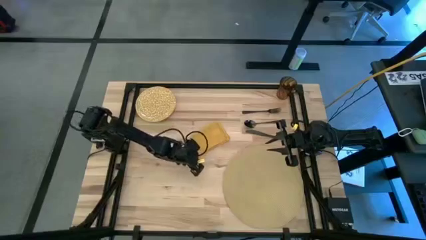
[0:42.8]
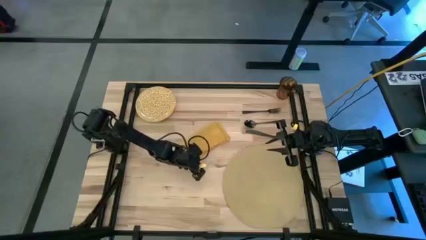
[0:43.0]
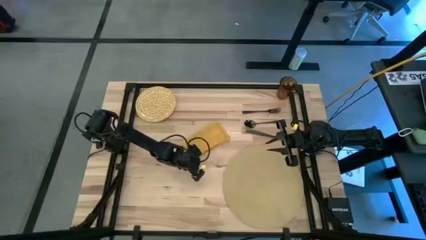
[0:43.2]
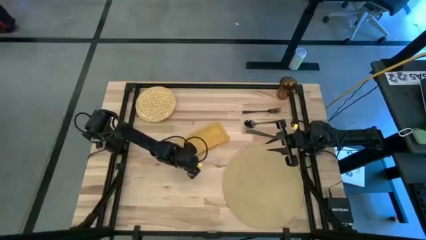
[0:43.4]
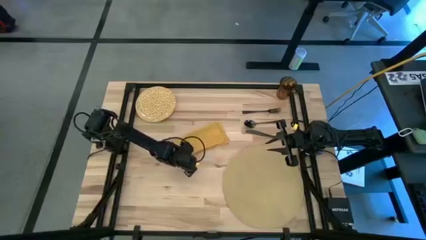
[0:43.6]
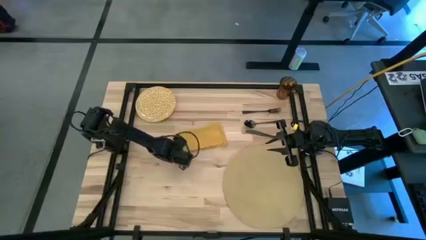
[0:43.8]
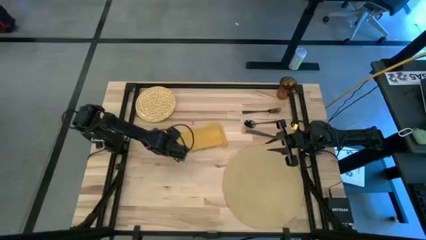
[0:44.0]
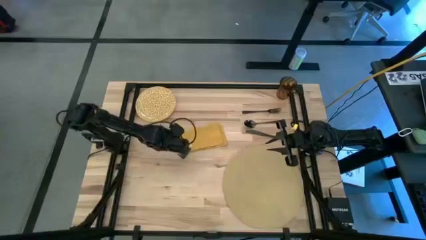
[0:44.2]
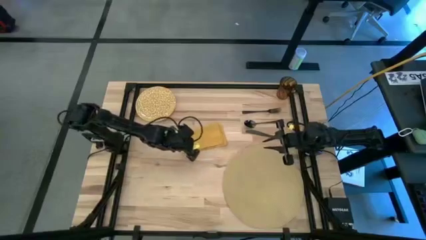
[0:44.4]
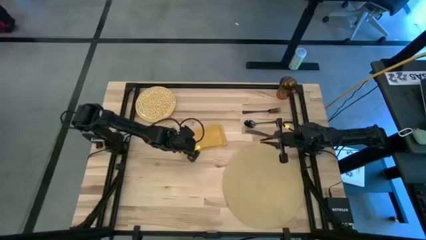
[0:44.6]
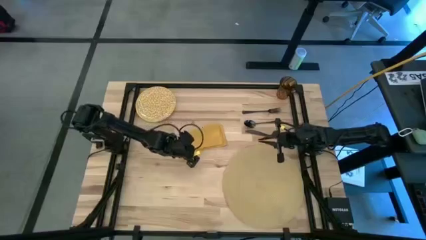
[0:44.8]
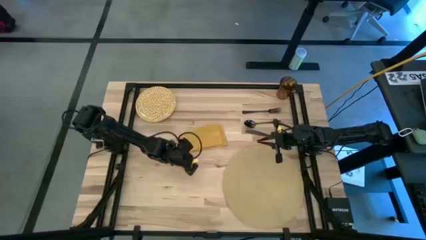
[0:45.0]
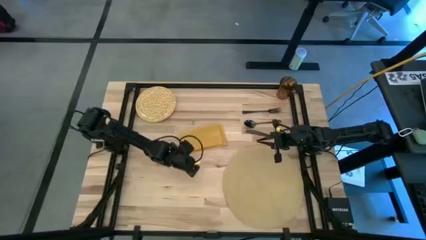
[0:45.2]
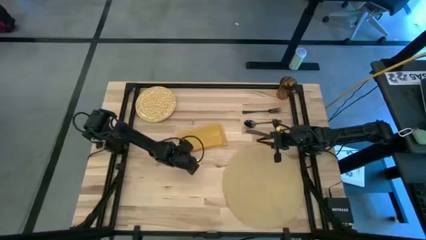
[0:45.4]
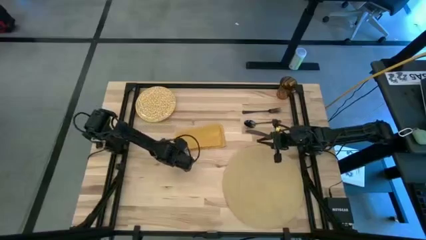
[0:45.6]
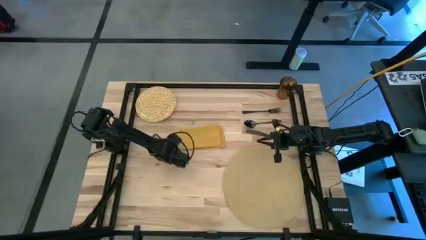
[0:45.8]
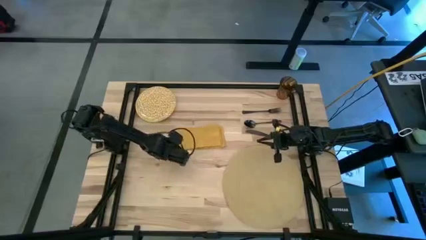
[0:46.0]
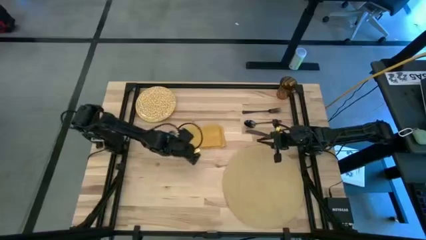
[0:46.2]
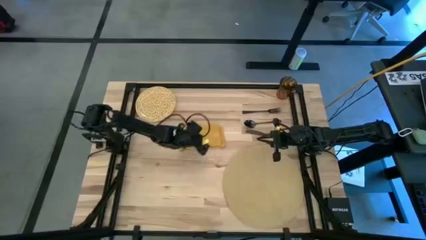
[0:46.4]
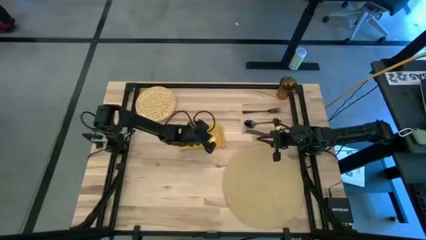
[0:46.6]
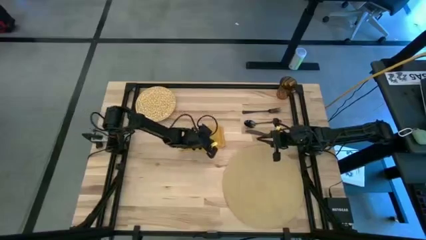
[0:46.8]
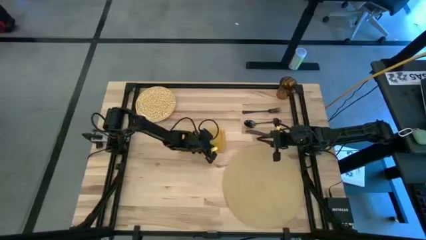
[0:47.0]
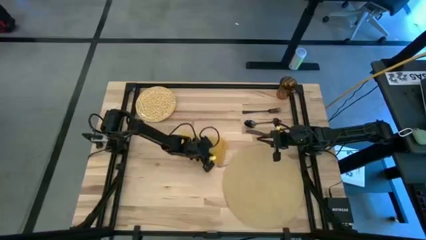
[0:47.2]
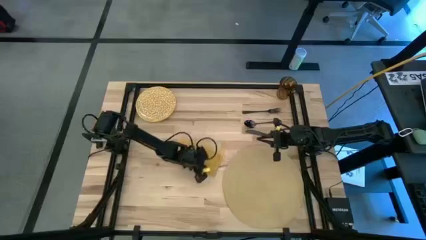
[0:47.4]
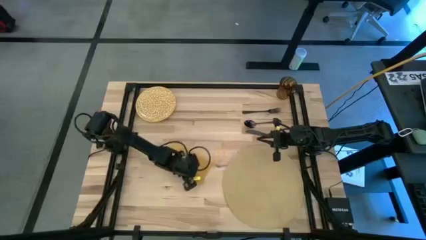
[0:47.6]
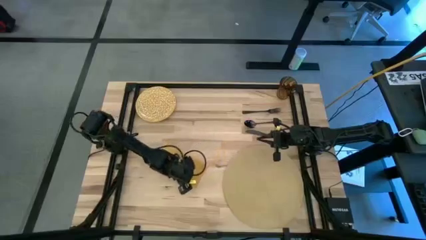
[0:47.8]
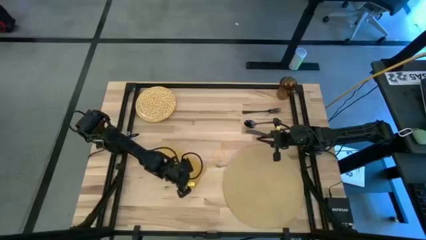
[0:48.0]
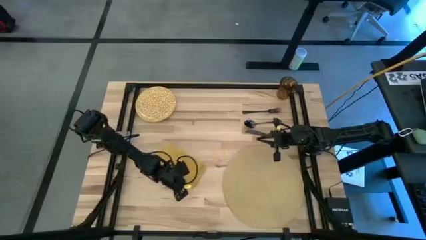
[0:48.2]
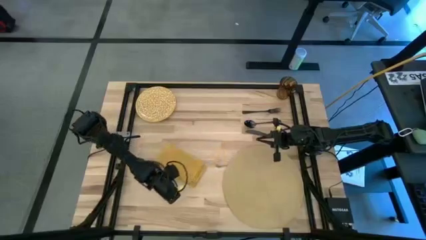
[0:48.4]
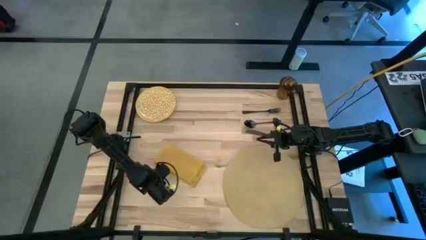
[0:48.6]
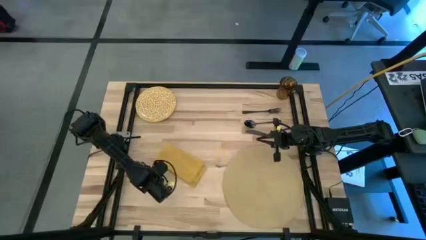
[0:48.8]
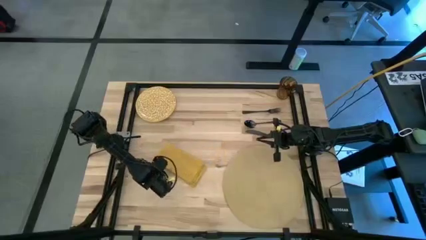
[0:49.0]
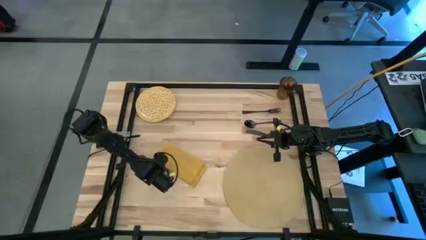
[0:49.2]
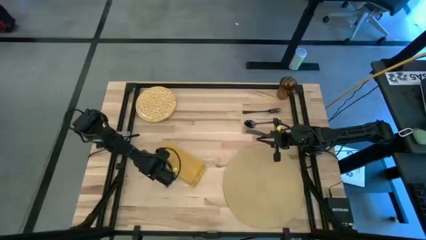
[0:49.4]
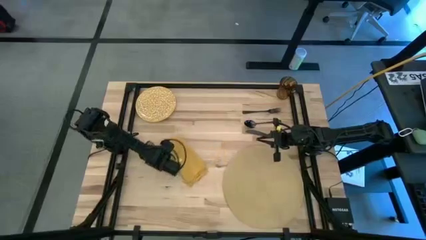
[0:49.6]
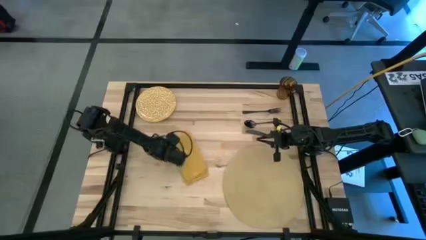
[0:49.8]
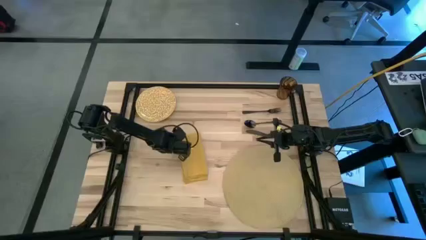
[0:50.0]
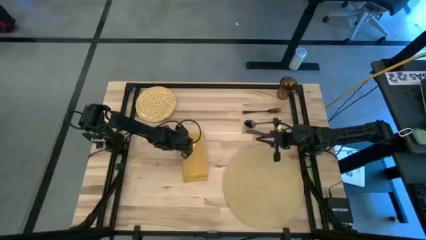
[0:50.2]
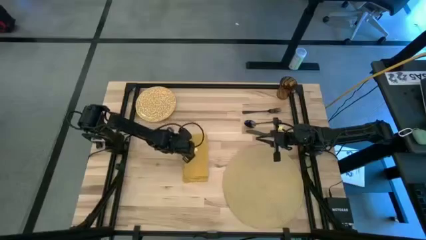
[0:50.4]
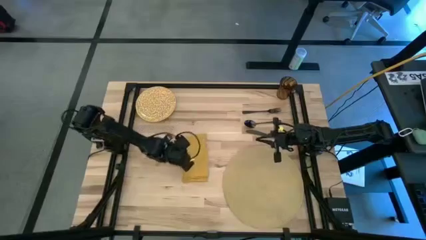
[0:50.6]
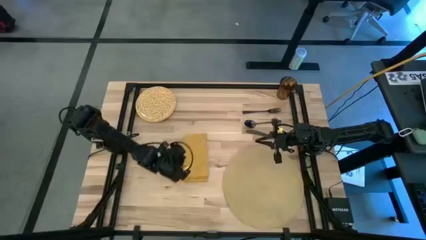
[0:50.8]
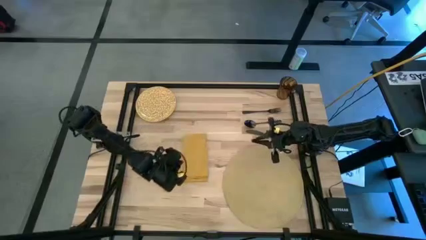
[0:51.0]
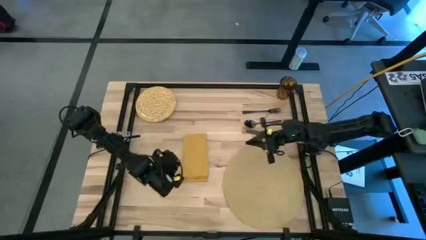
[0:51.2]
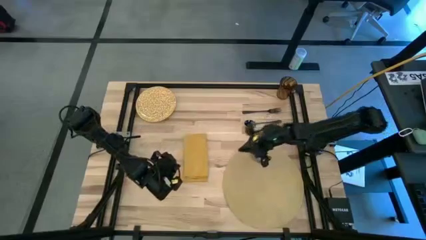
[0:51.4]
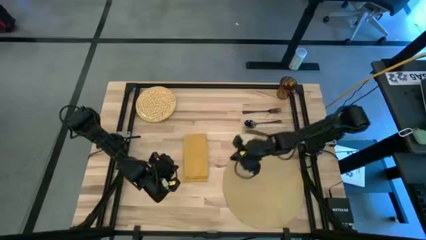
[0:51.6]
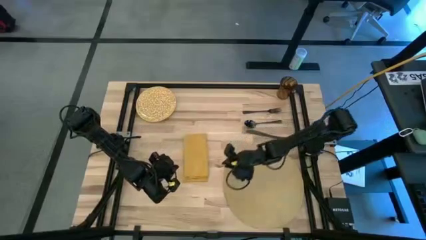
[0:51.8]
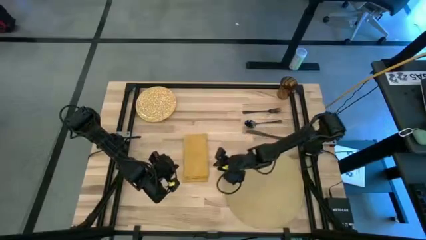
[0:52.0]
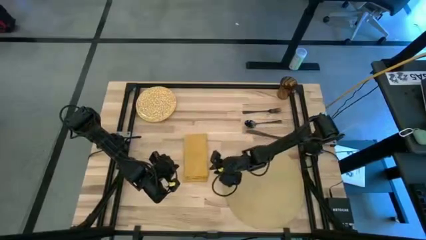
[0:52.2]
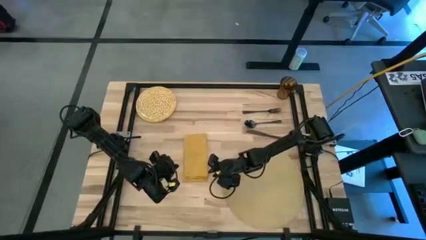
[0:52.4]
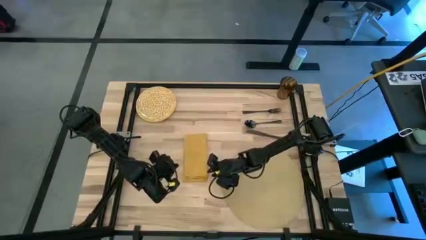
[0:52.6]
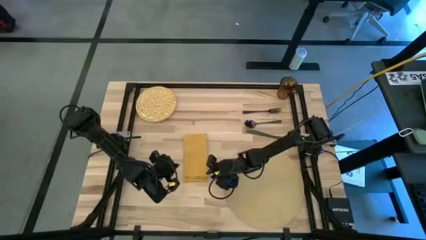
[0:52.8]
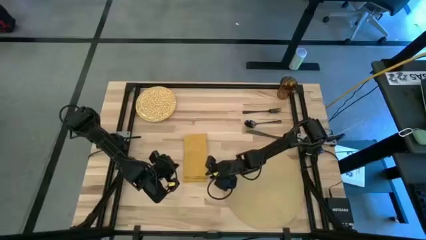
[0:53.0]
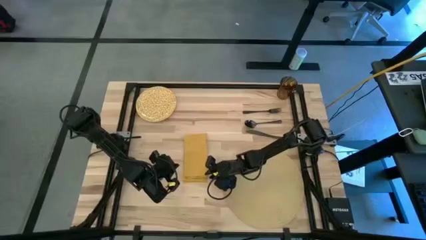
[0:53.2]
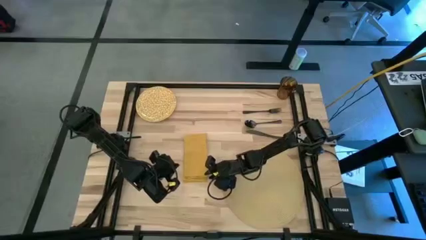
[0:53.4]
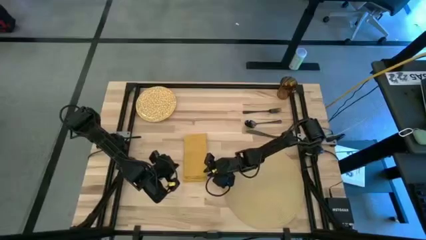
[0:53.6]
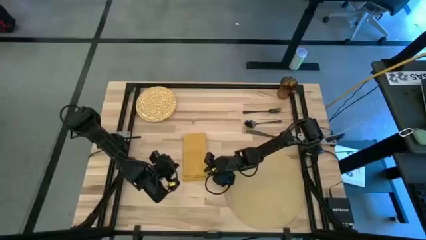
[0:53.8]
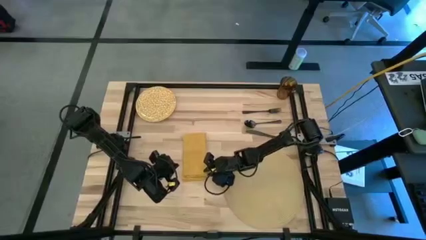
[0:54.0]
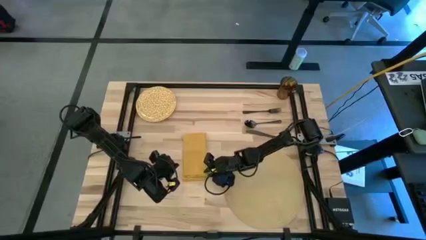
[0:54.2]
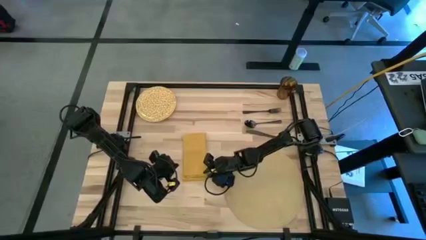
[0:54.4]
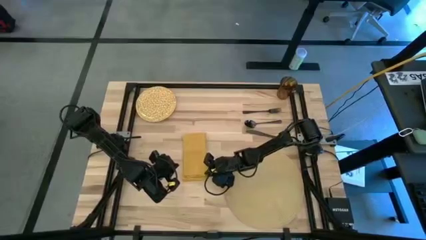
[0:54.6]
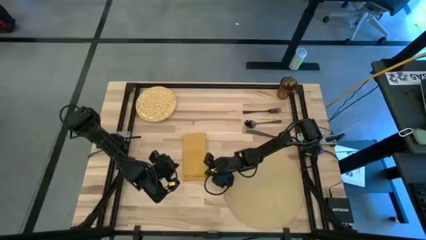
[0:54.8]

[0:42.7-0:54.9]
Task: Set table place
Fold the yellow table napkin
